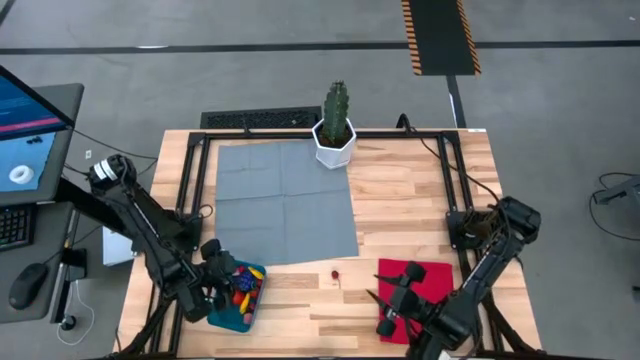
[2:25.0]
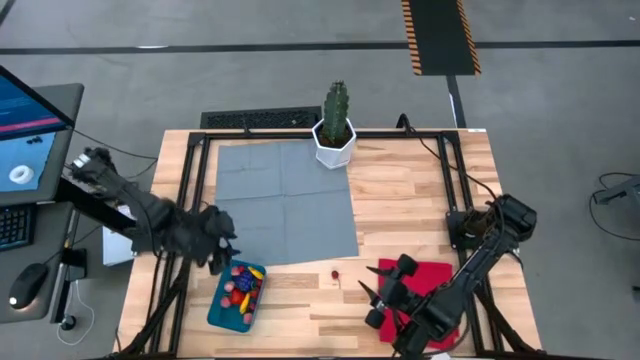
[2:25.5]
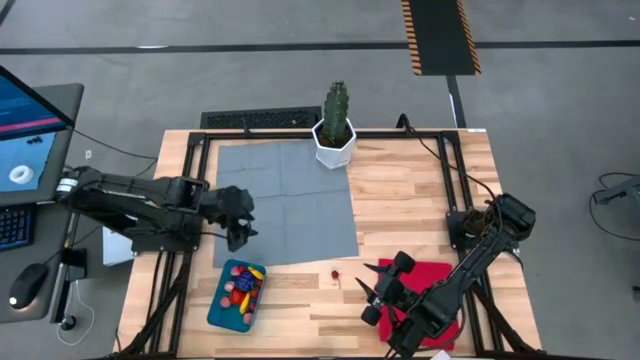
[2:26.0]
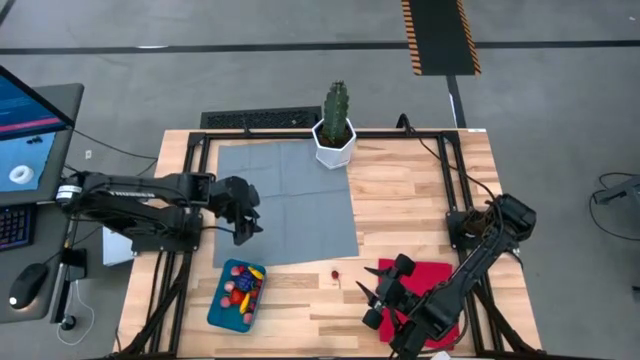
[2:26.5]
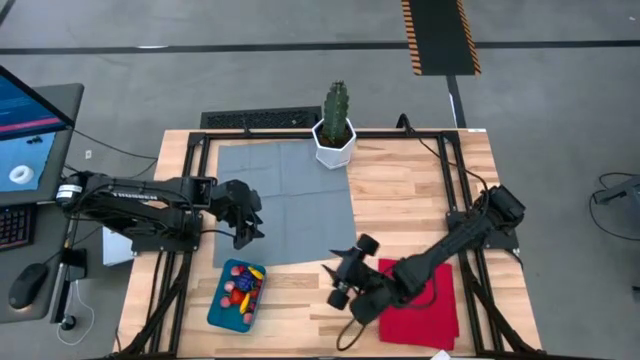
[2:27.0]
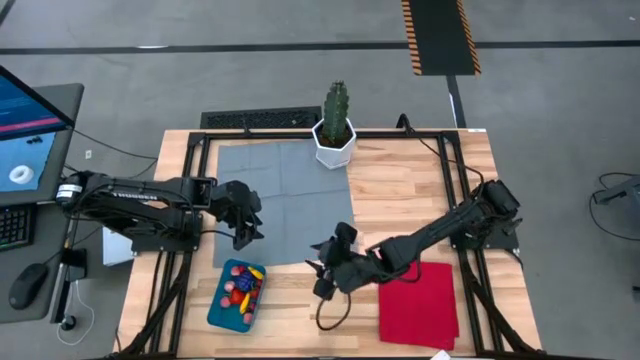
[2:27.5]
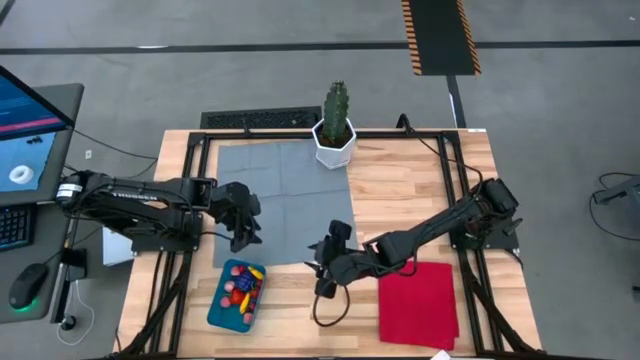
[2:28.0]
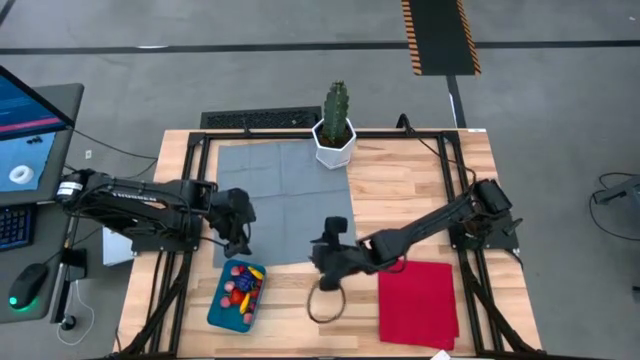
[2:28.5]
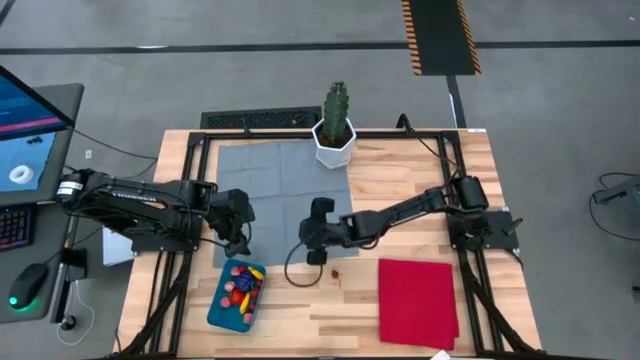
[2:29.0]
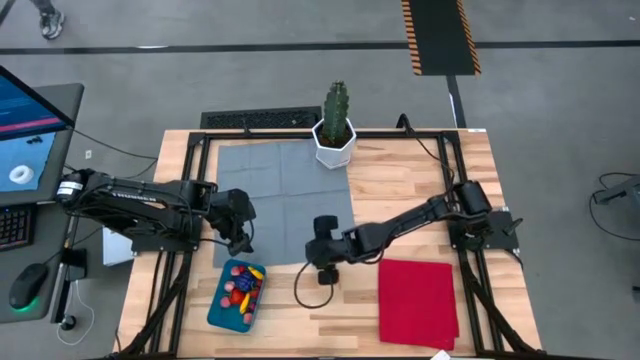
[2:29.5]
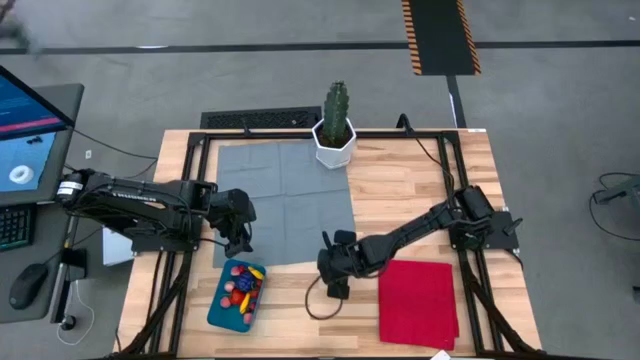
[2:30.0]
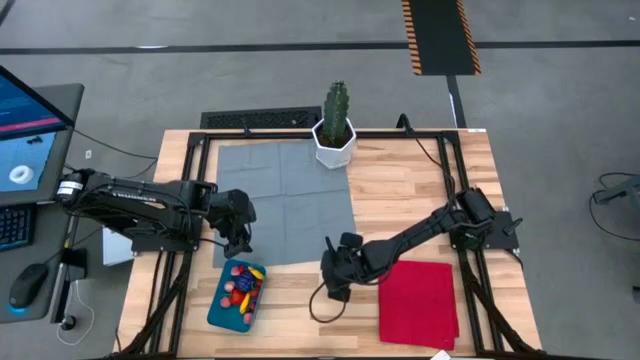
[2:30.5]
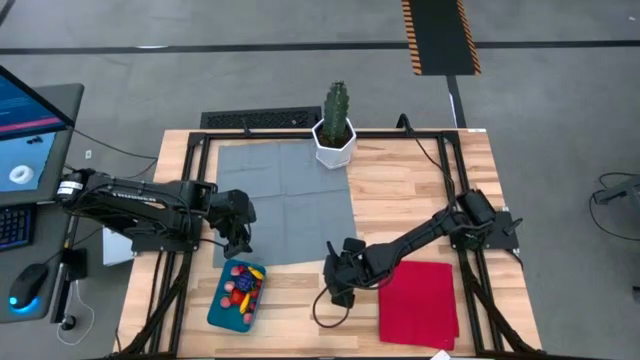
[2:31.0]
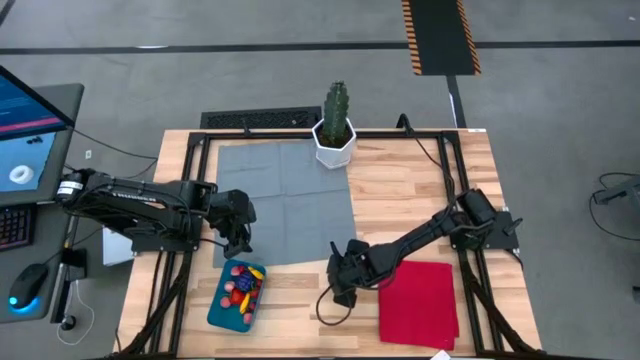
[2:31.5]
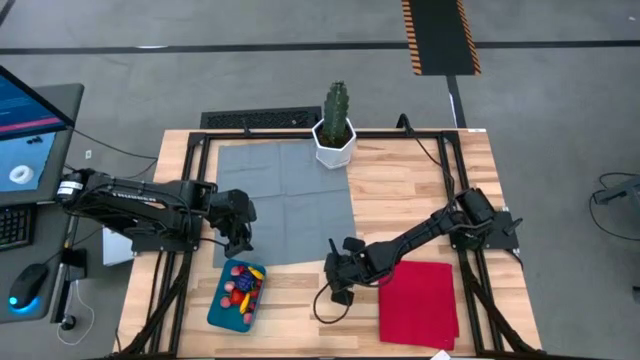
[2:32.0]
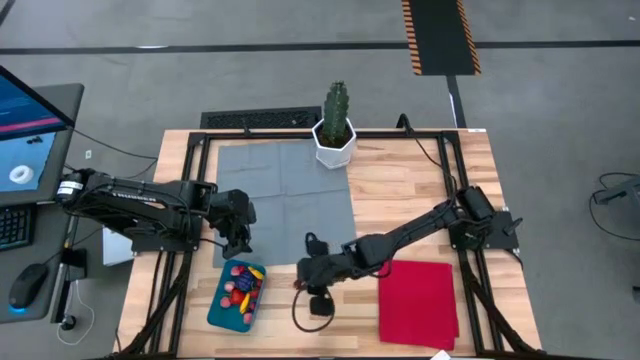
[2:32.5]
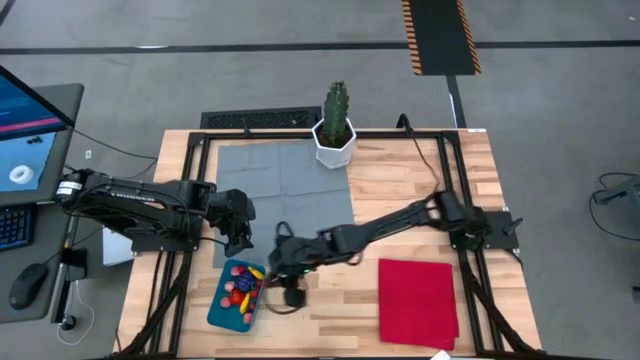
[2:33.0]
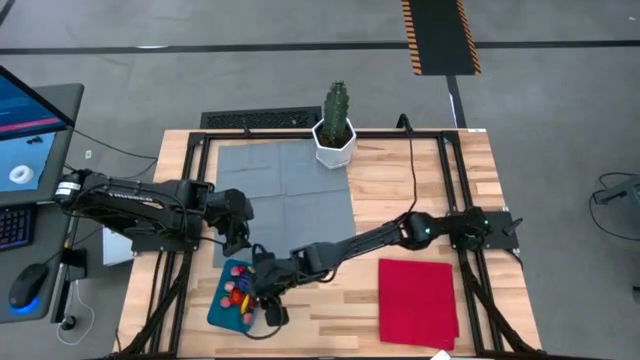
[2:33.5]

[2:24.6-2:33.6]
Task: Pick and placing Produce into tupperware
Put the cherry into the blue bin

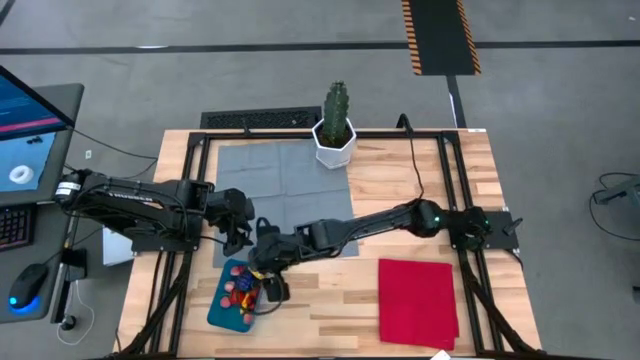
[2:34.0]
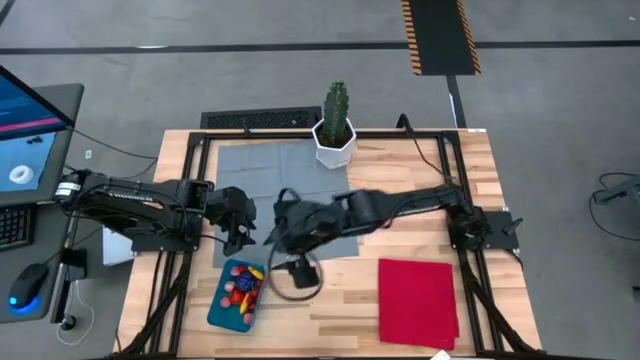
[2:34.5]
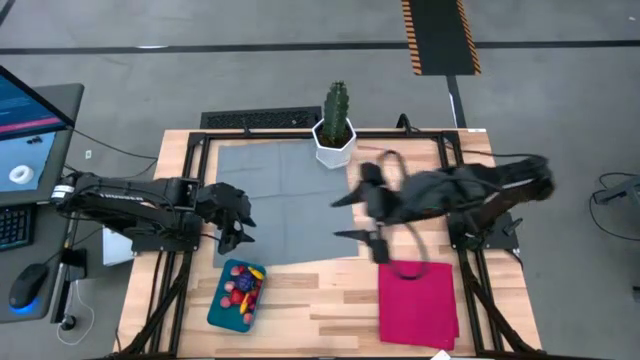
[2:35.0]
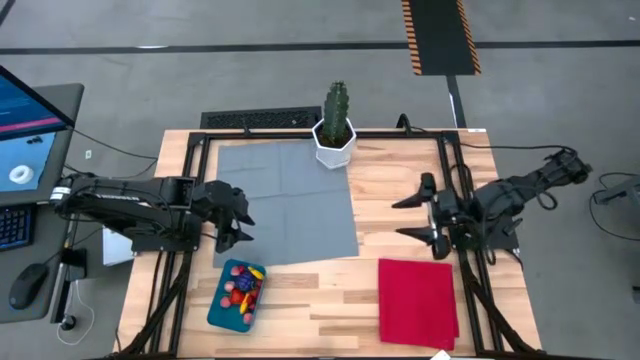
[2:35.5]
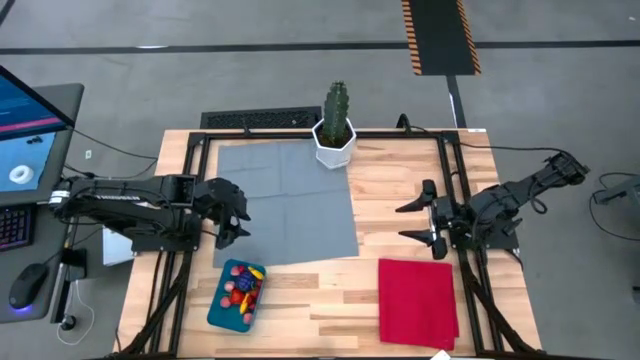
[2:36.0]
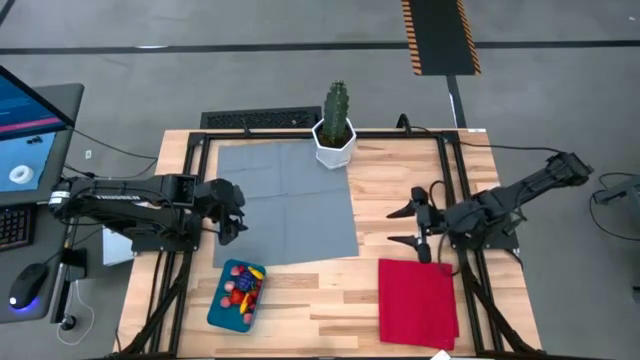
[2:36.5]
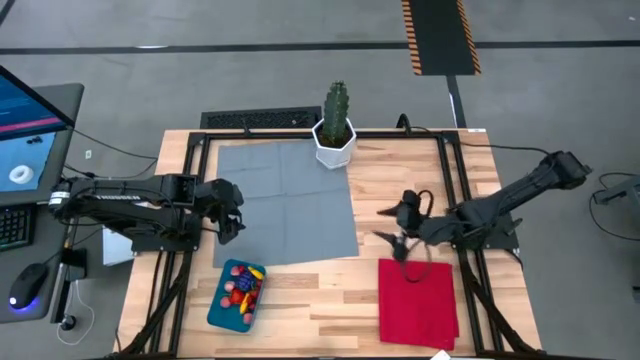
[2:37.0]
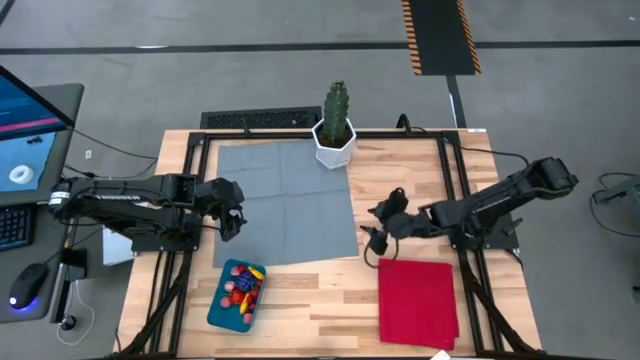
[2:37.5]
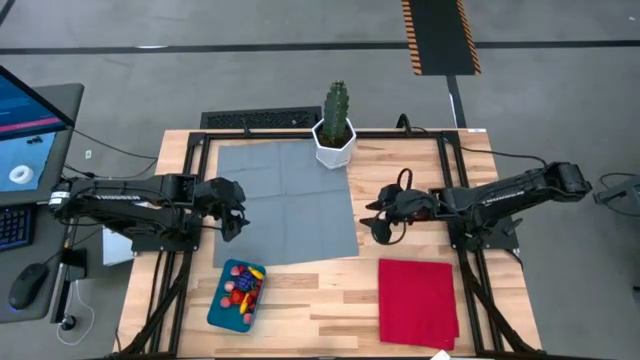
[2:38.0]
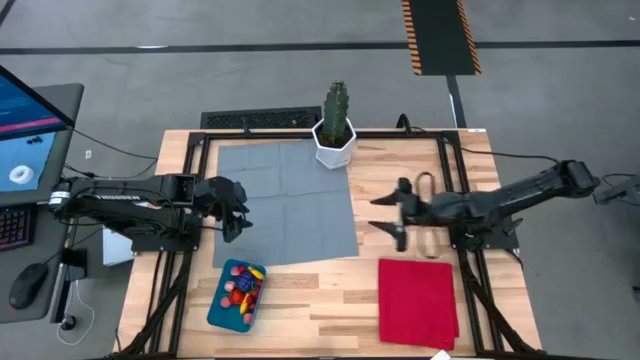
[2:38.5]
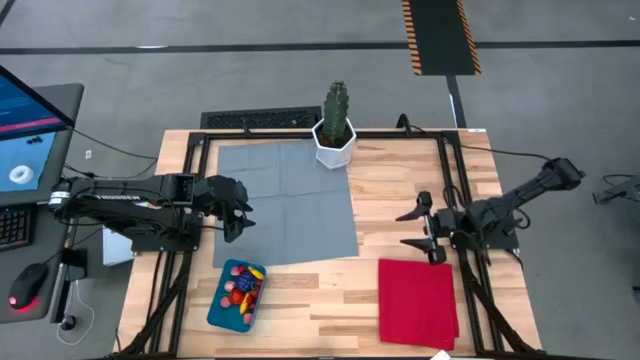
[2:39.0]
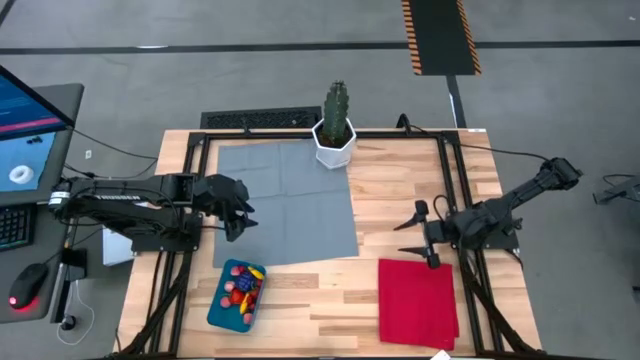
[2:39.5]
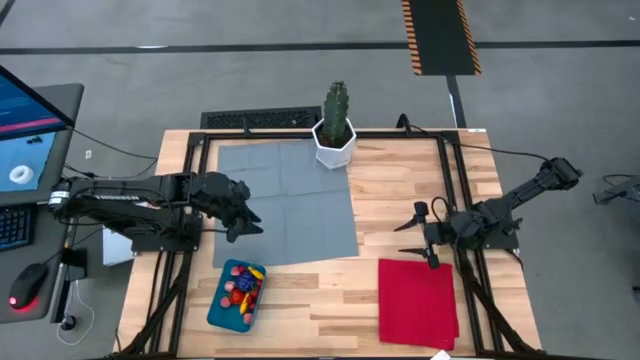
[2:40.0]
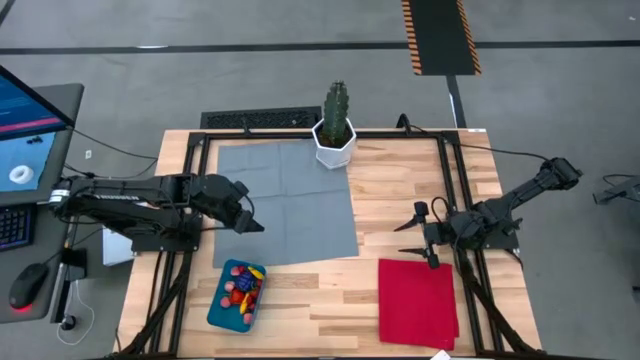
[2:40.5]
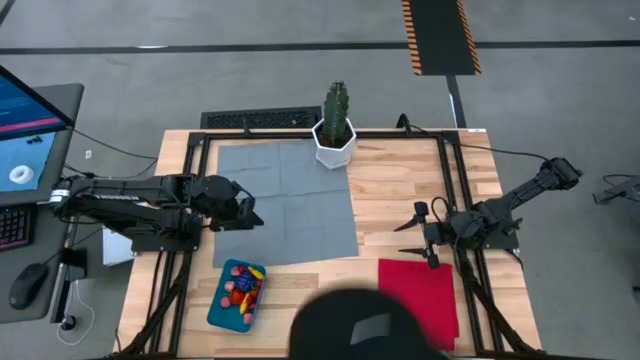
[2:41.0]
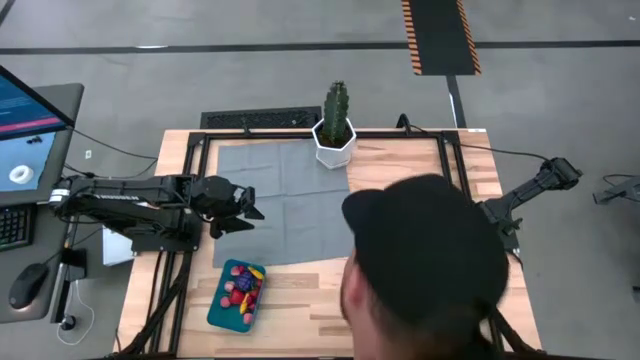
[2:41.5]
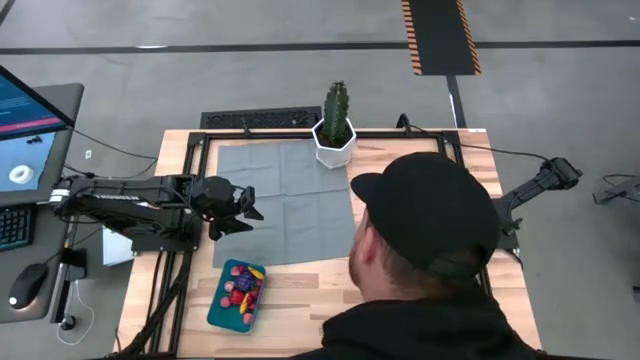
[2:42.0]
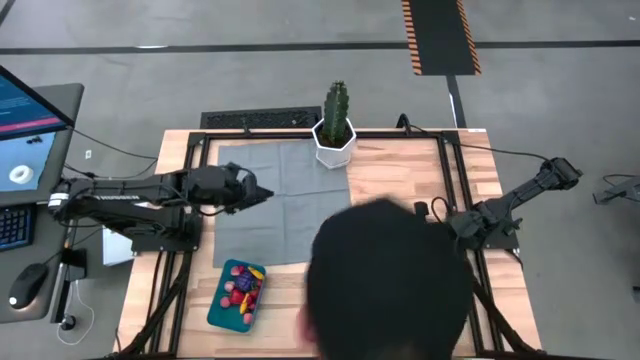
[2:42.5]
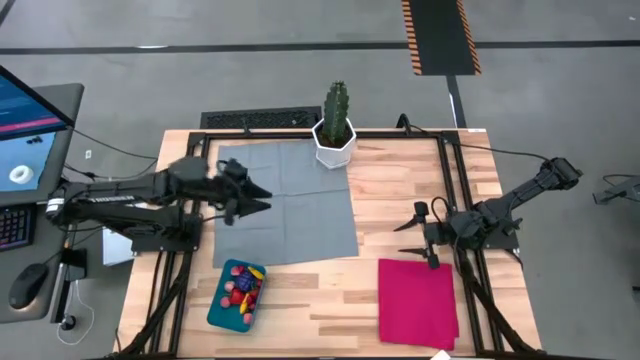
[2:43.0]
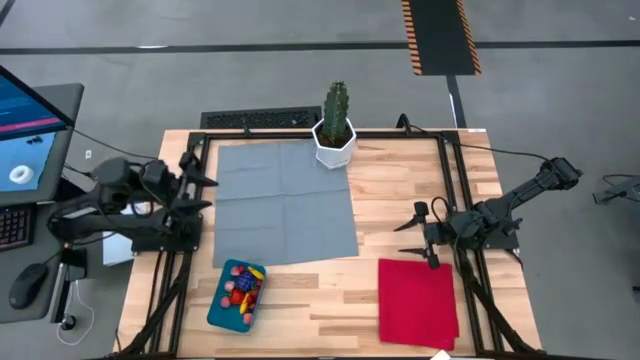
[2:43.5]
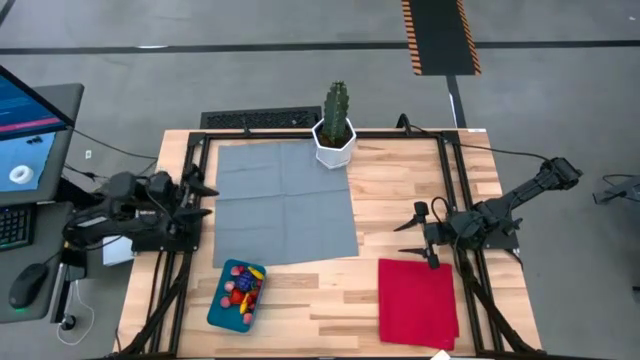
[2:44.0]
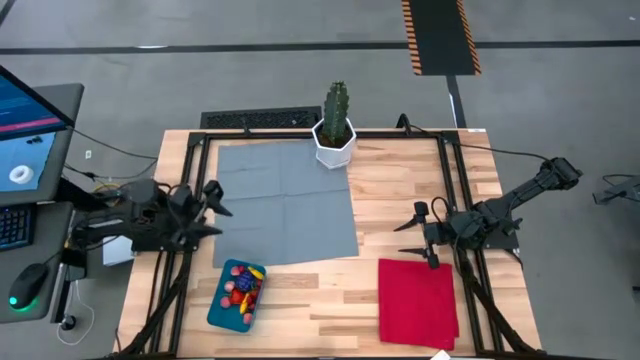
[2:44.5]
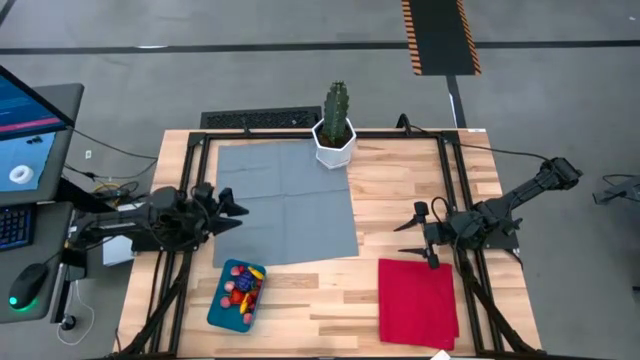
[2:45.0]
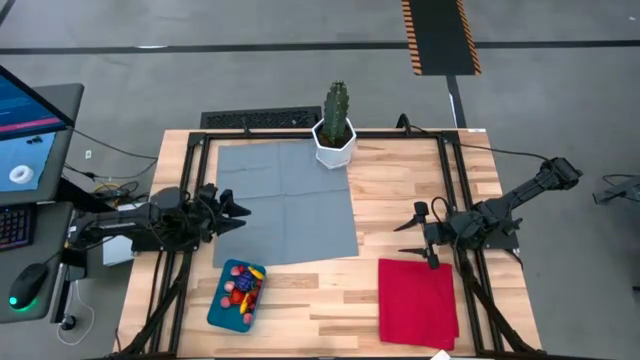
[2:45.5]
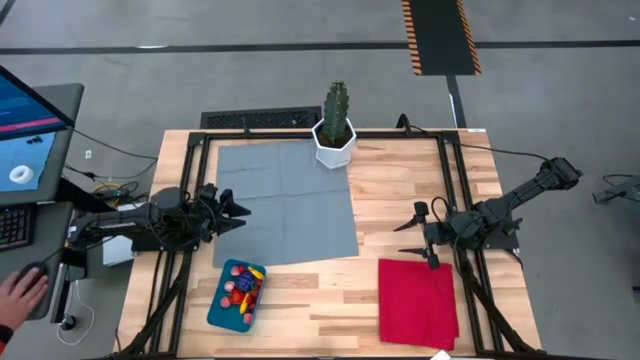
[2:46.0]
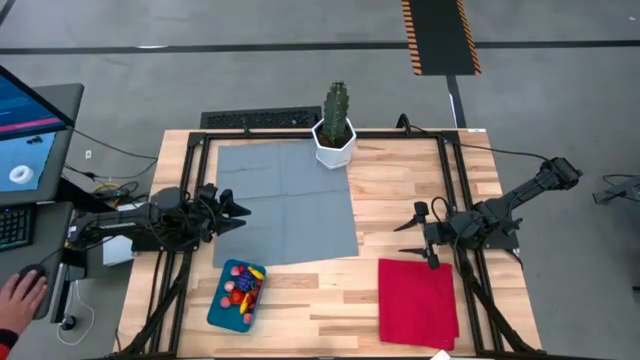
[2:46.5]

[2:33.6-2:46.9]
Return to Home Position
